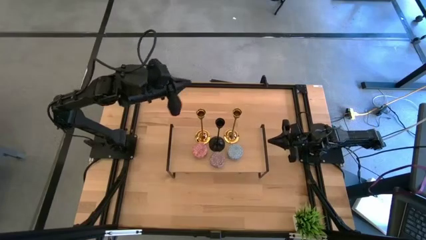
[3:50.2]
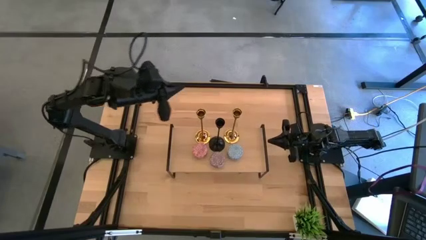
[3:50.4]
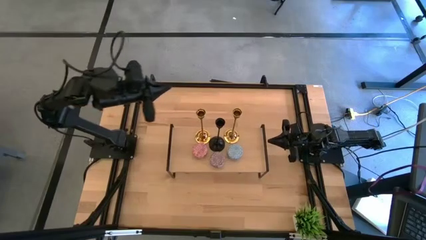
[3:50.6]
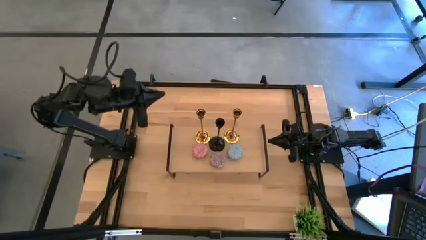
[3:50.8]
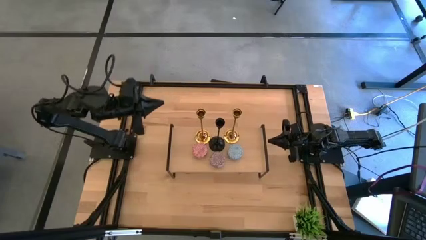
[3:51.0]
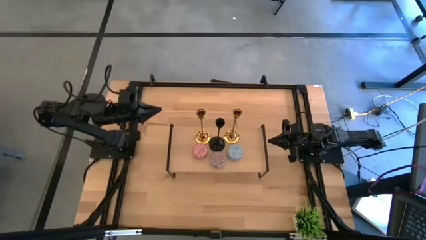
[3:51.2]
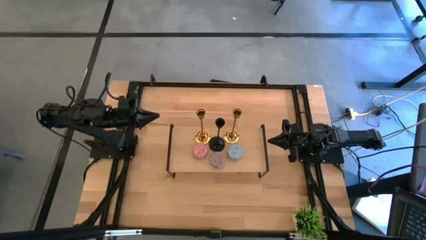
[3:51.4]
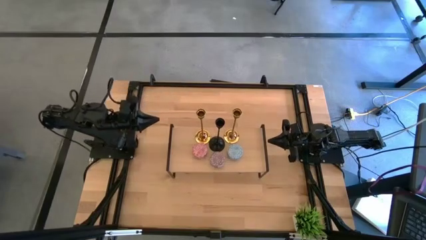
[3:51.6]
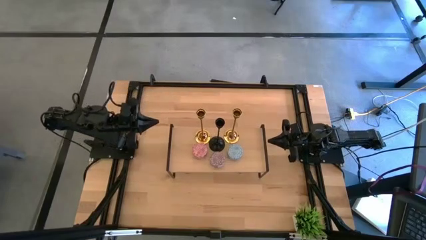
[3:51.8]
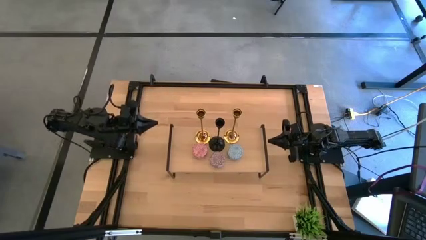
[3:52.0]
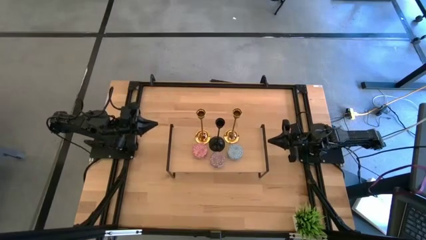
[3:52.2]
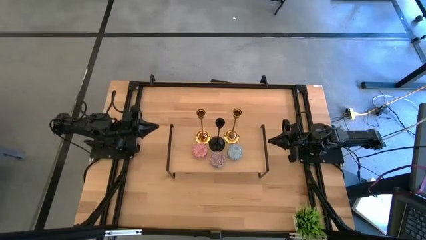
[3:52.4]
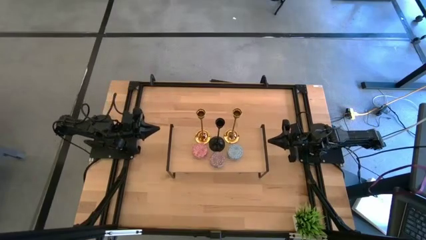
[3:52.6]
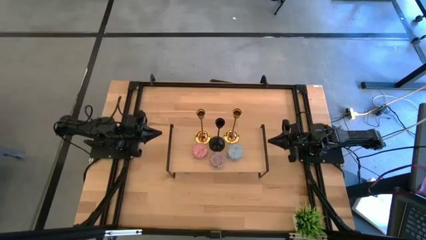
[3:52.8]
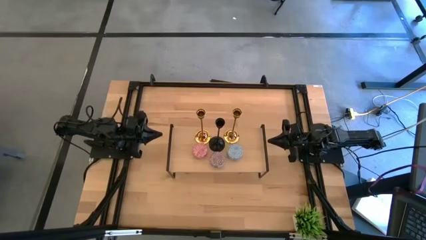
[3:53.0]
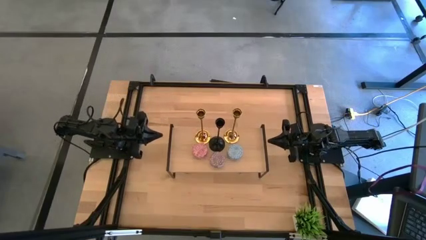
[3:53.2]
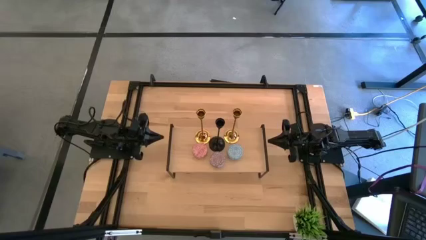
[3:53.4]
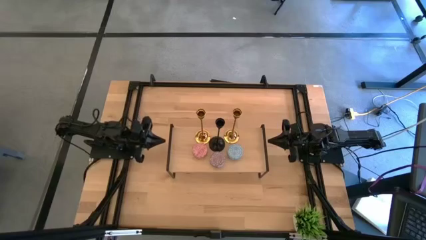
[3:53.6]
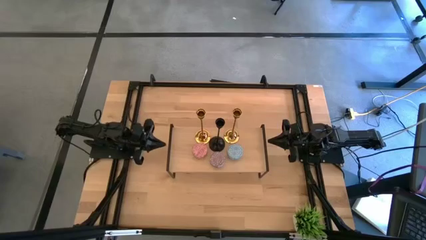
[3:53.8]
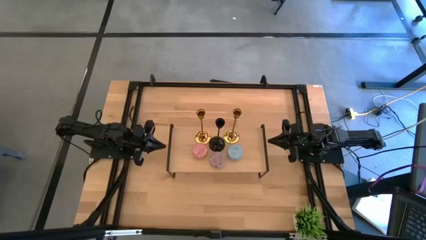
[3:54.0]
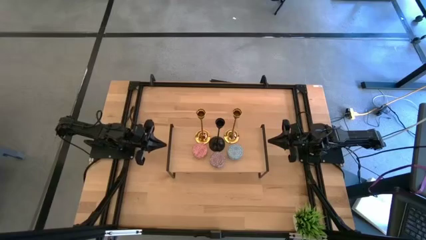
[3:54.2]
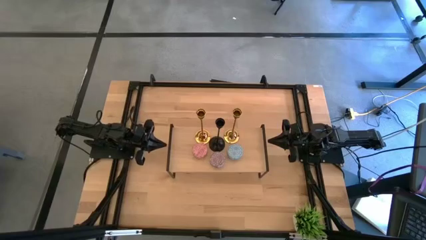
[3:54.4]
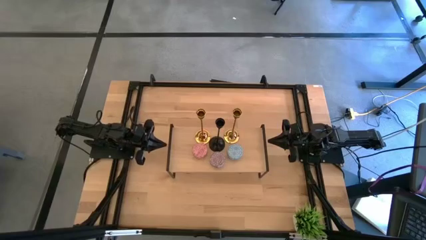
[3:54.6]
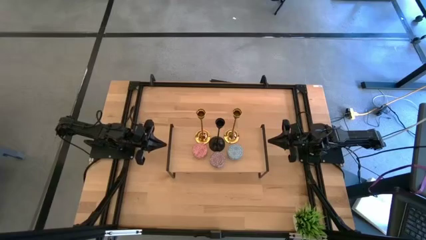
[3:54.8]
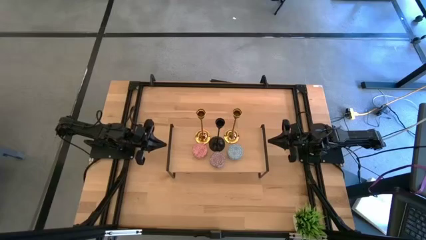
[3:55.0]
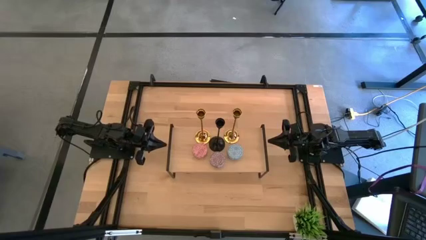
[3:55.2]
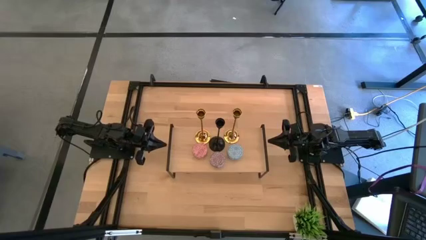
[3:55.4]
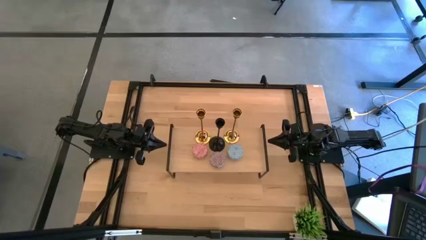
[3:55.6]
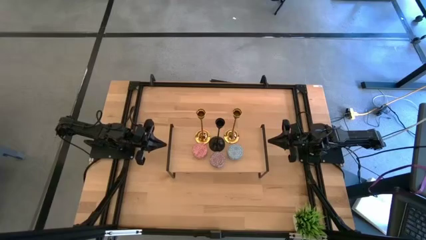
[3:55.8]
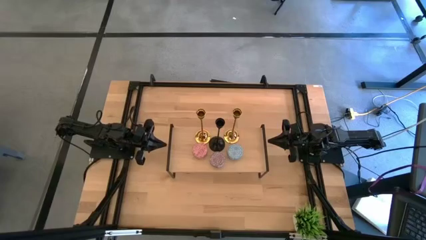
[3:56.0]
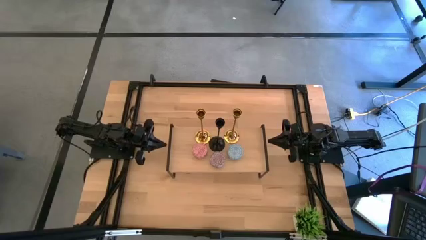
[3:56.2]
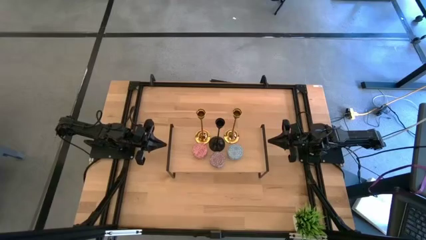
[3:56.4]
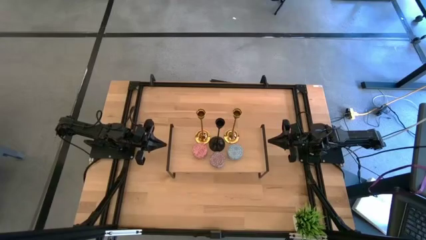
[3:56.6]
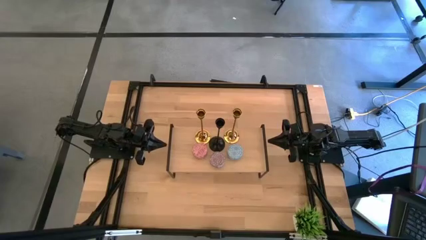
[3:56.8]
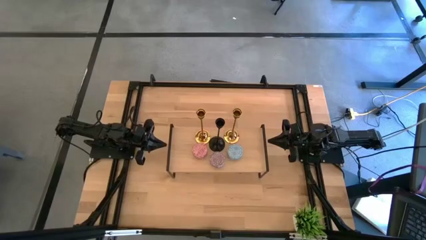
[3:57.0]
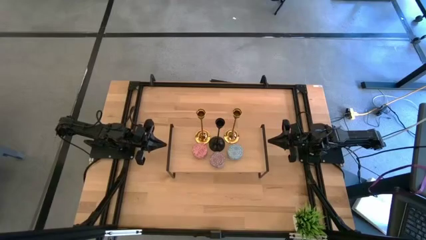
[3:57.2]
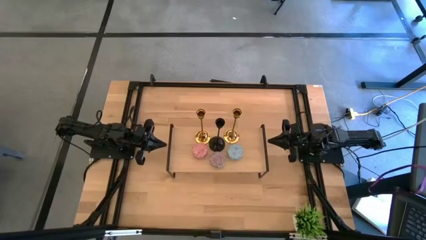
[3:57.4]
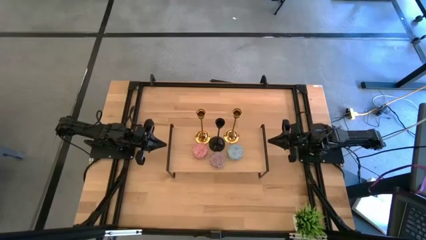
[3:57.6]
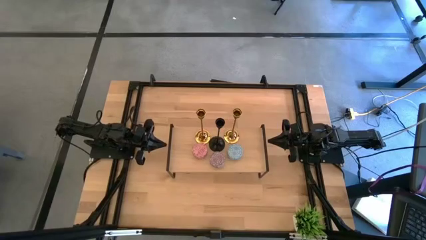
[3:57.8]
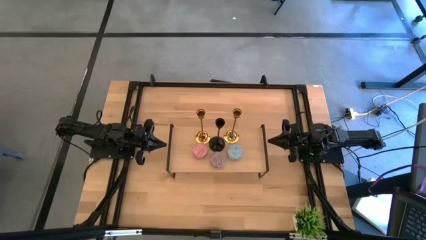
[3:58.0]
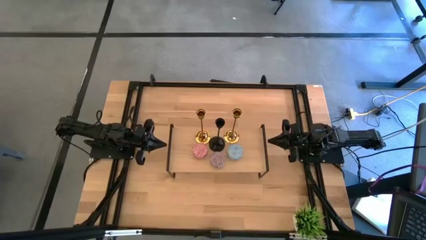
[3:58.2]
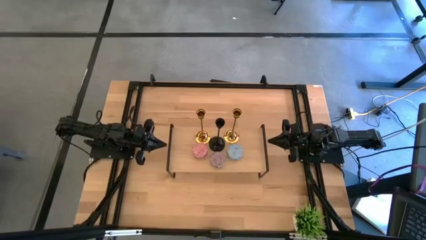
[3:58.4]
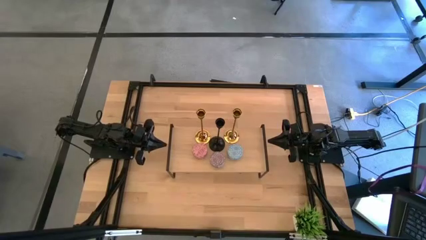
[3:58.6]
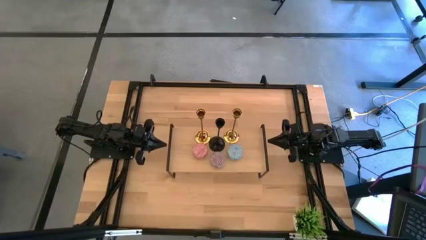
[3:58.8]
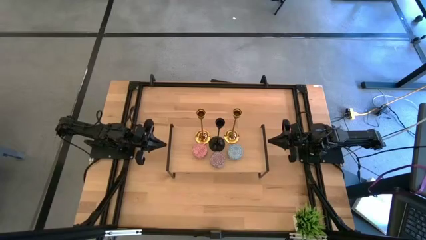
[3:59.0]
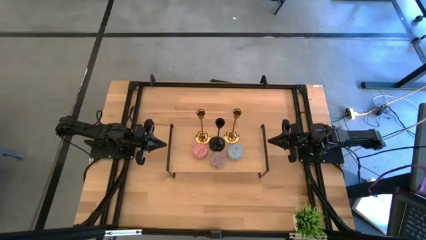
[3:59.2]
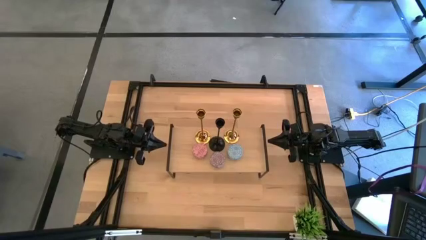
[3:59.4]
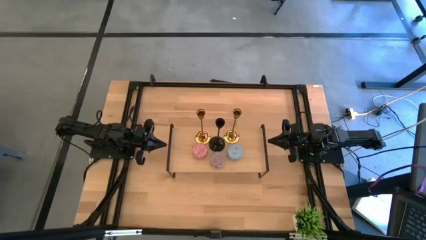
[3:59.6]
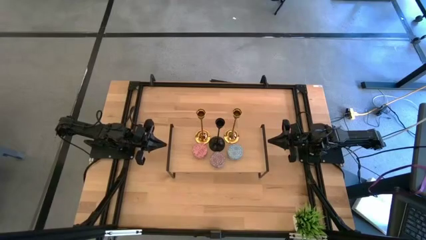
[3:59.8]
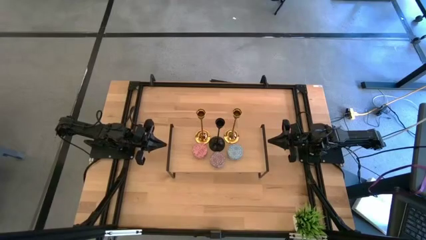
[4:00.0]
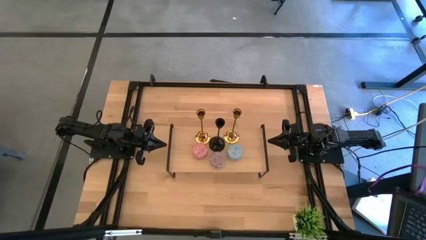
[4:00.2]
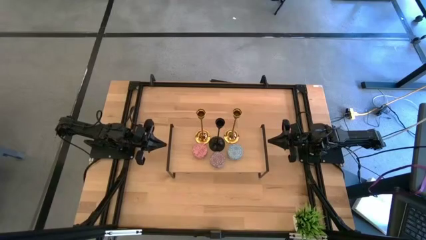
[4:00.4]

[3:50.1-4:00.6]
Task: Pick & Place candle stick holders
Return to Home Position
